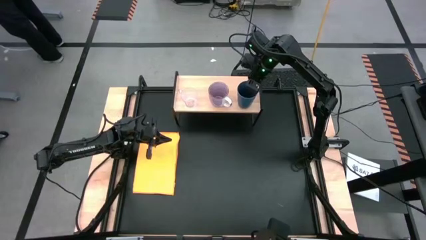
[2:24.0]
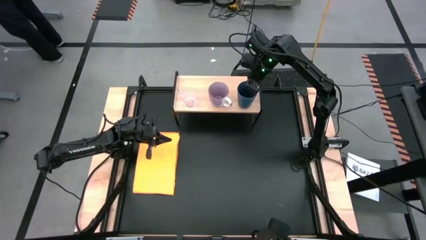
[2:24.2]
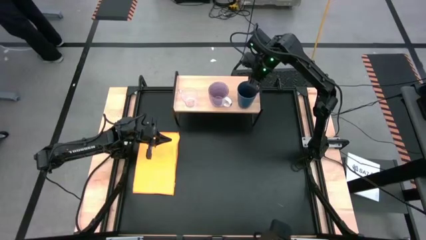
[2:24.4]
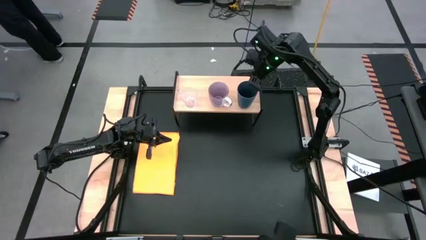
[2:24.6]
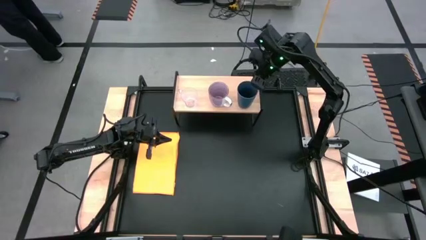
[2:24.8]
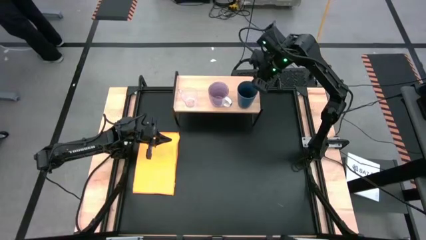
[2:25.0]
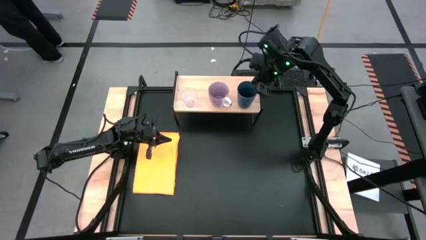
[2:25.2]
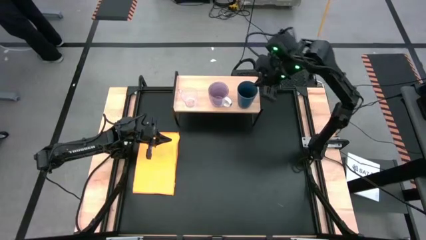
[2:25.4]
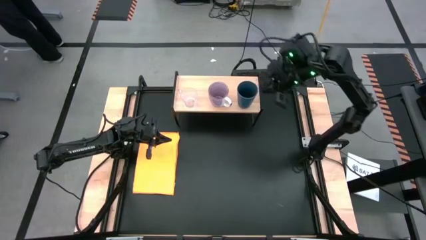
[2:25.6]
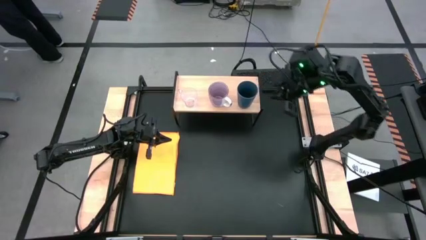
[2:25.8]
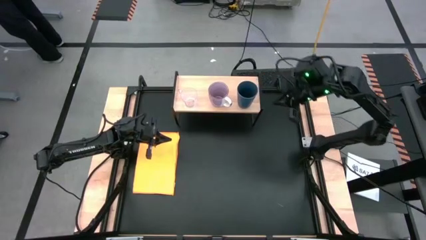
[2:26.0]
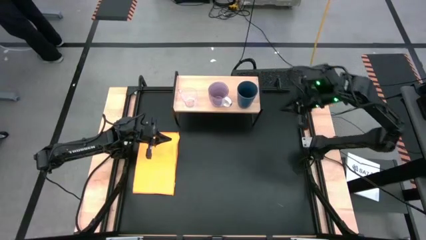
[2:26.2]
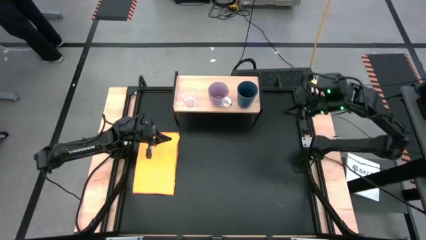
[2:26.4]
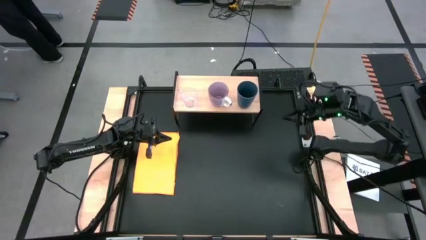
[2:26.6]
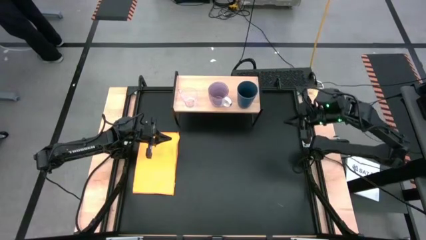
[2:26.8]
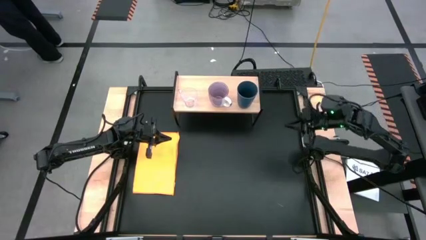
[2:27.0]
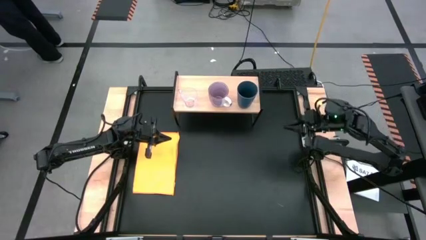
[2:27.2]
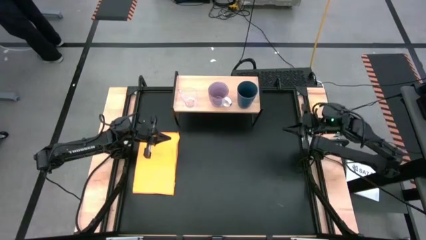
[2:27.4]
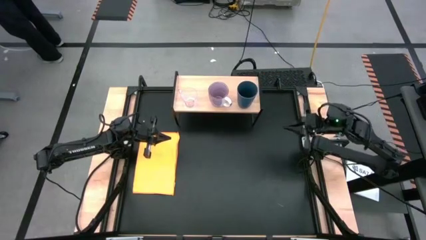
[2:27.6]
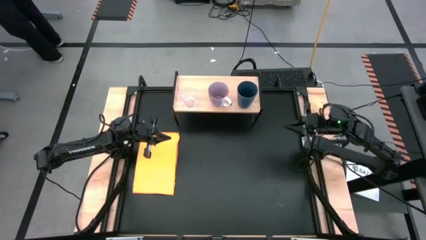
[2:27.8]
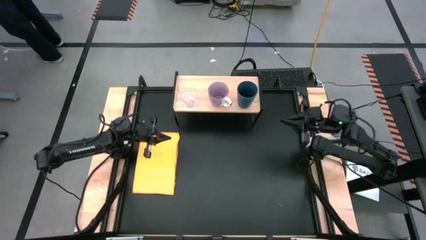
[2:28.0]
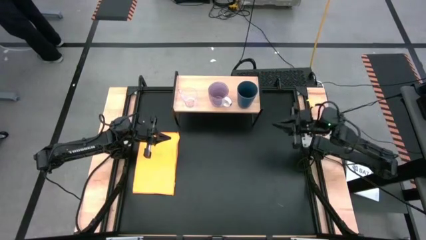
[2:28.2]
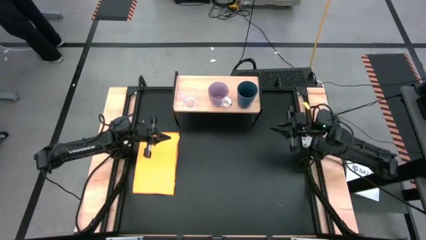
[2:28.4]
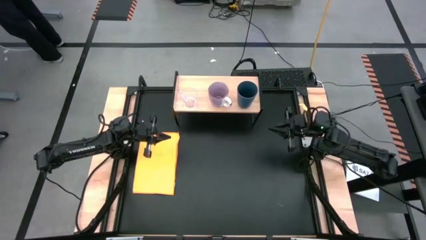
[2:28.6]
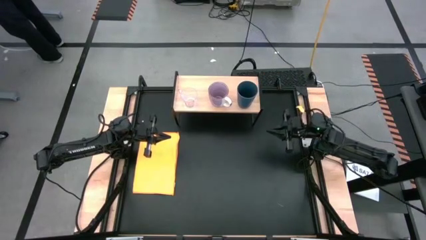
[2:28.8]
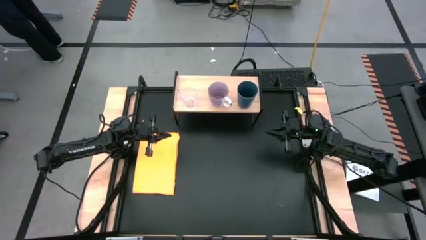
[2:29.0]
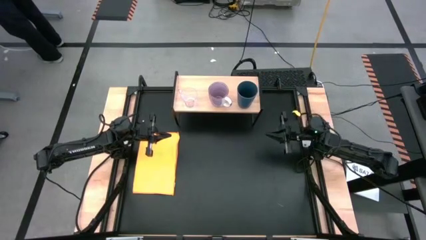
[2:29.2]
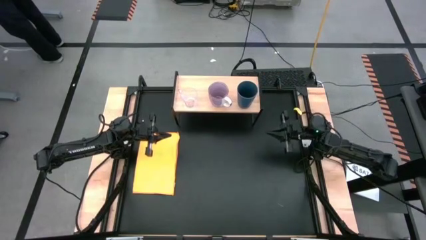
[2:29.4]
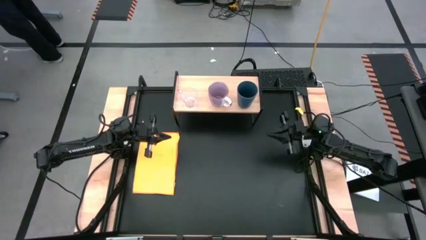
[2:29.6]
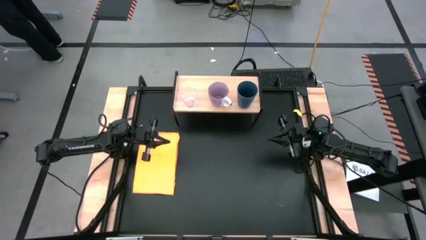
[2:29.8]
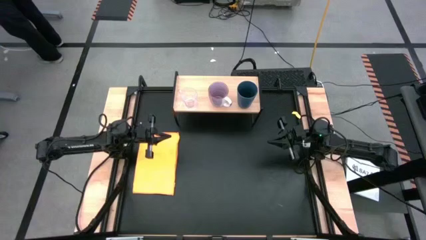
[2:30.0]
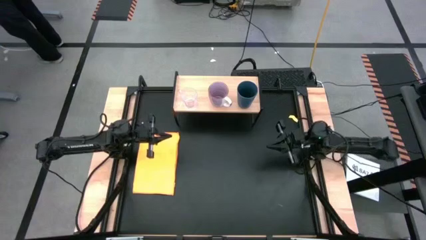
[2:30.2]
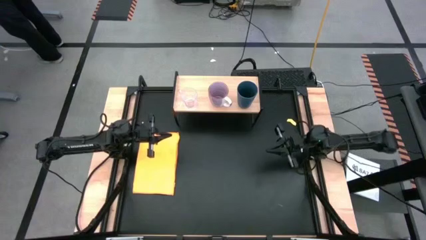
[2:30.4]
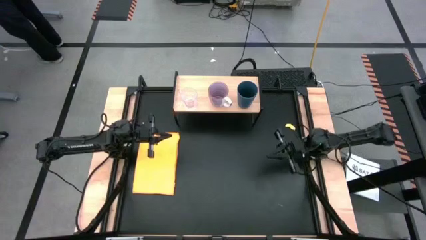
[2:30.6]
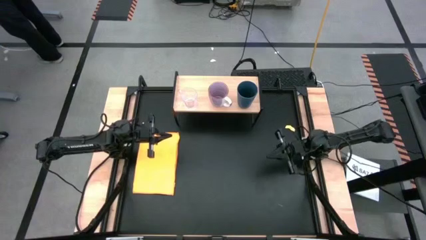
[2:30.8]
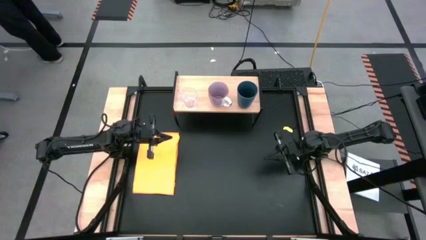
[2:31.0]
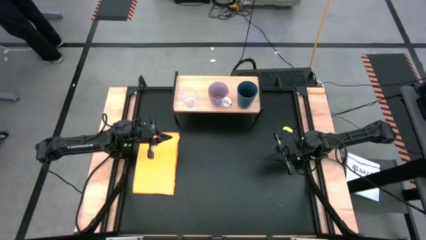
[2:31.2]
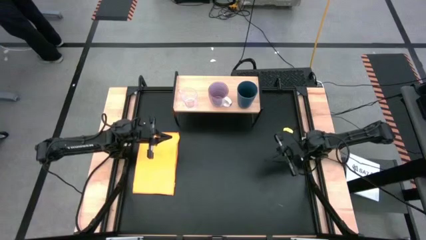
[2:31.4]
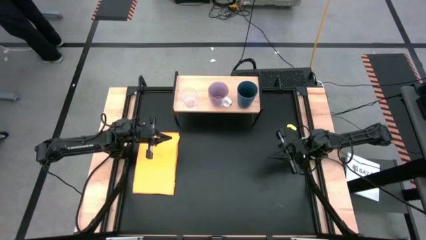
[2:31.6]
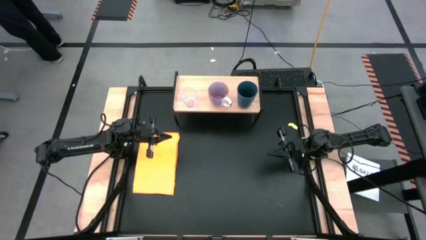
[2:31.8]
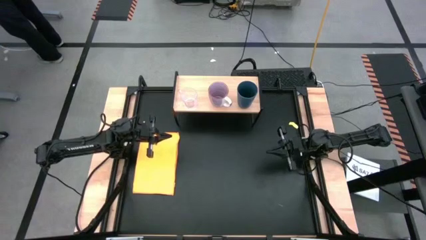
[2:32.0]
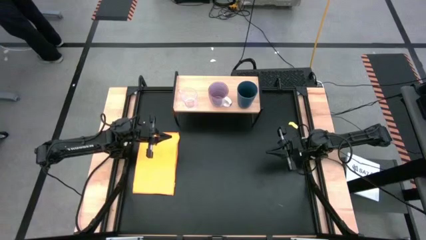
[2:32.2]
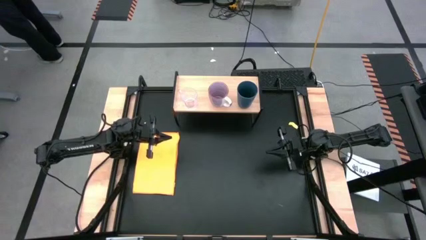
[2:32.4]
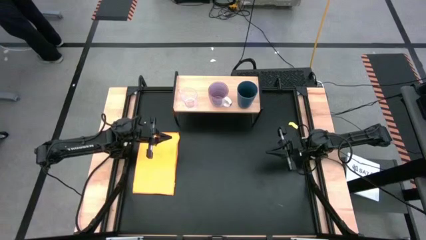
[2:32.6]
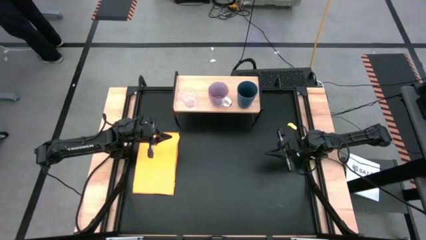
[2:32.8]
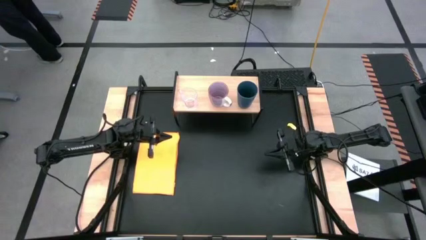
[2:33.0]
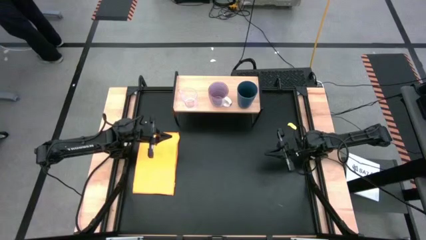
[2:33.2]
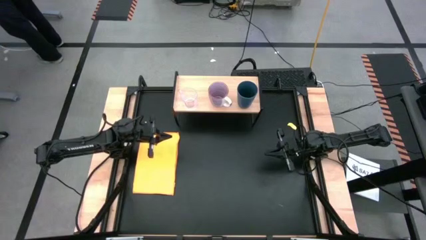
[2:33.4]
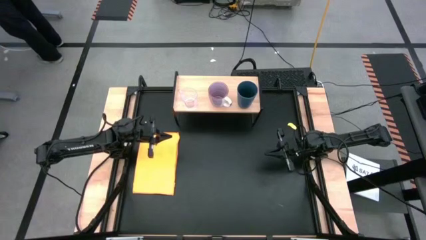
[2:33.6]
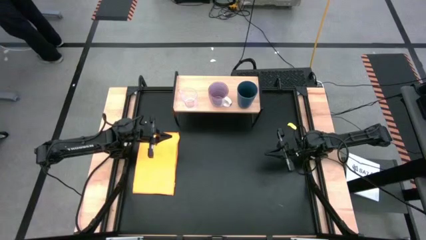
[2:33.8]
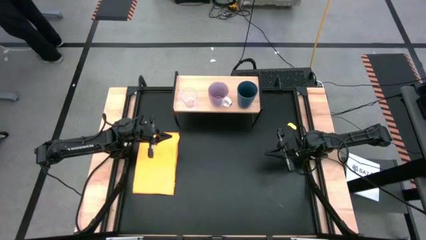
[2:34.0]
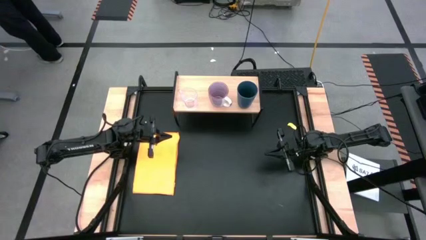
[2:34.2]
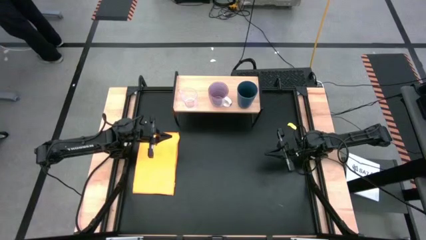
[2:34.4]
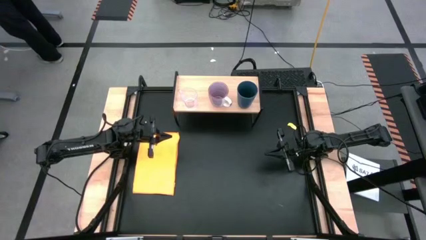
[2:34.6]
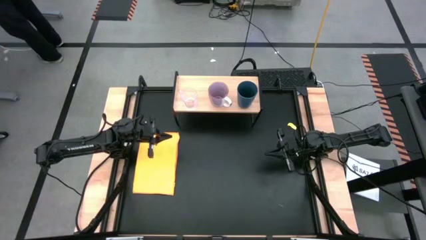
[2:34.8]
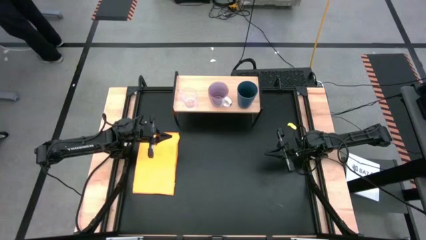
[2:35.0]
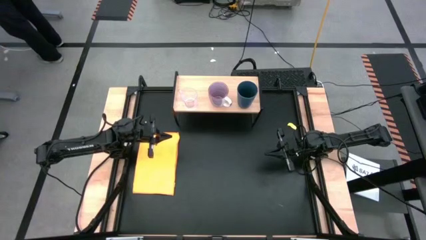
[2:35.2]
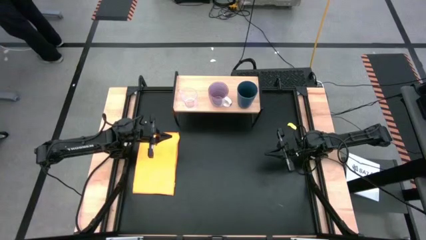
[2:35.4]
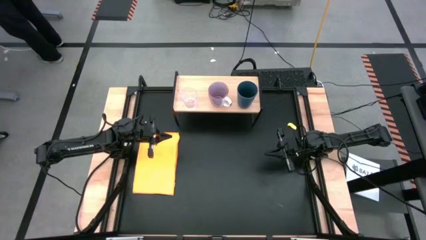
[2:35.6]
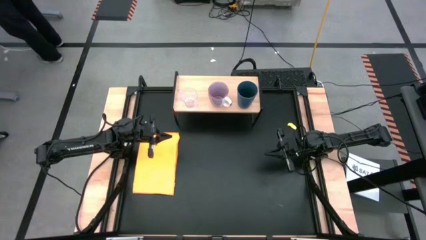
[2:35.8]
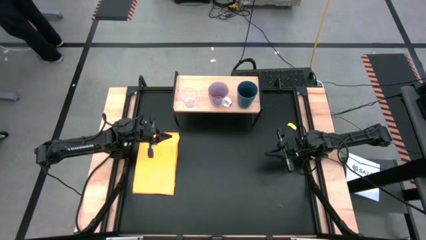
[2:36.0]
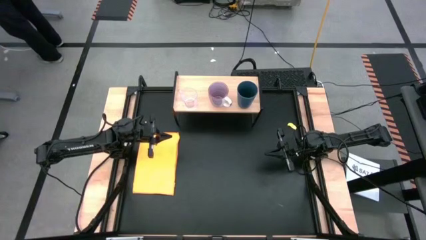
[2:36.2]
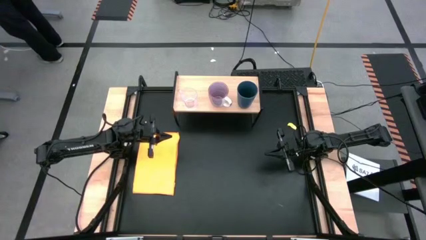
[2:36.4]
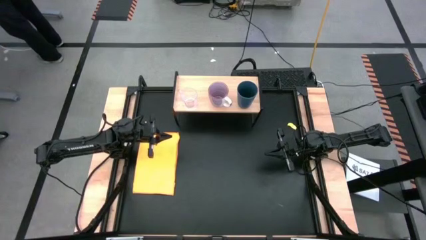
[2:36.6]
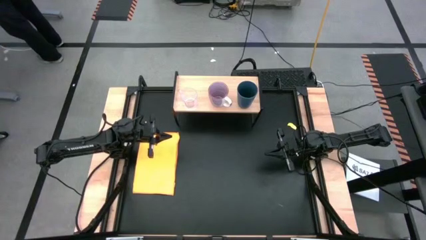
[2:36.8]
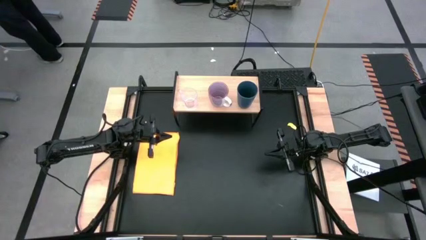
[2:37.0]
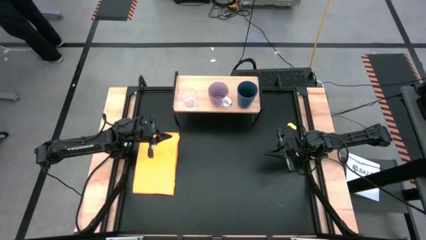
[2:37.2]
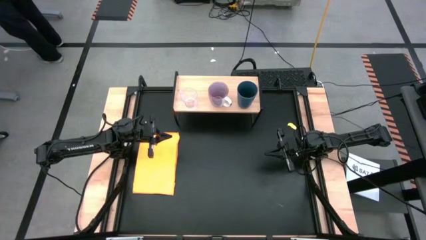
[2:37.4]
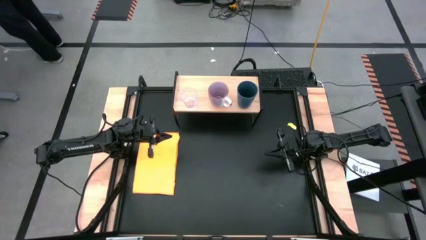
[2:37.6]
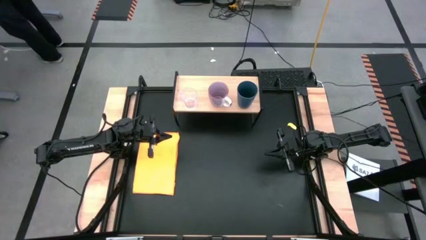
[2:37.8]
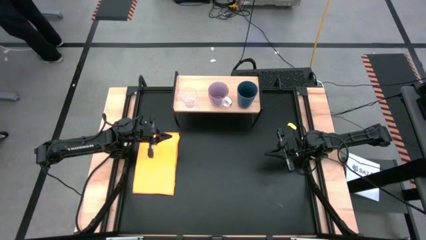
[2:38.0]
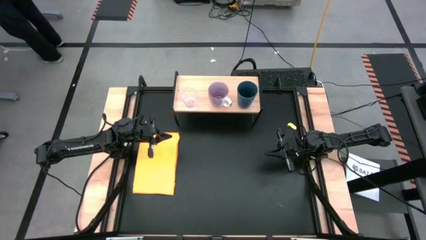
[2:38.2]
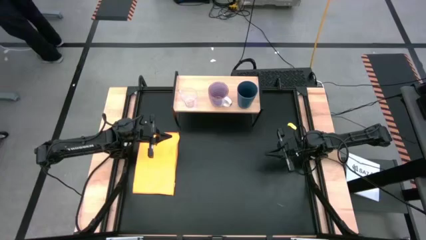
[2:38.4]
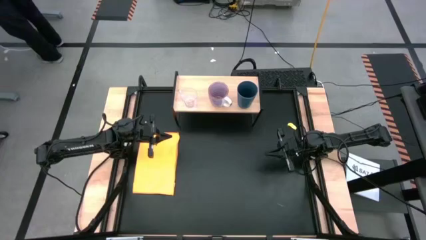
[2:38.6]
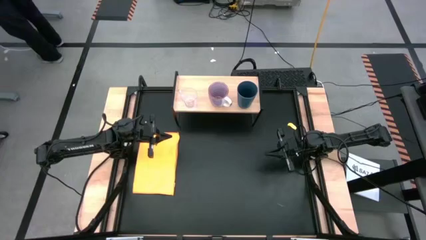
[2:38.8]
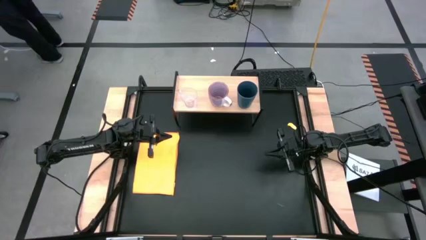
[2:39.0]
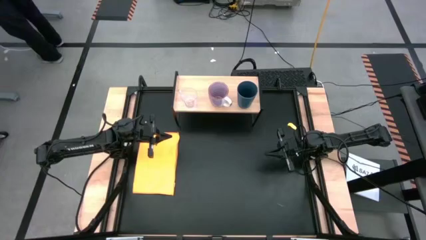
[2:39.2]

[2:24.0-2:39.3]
Task: Stack small to large cups/mugs on shelf
Return to Home Position
